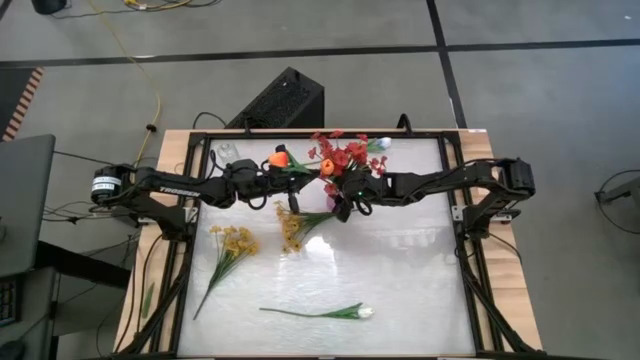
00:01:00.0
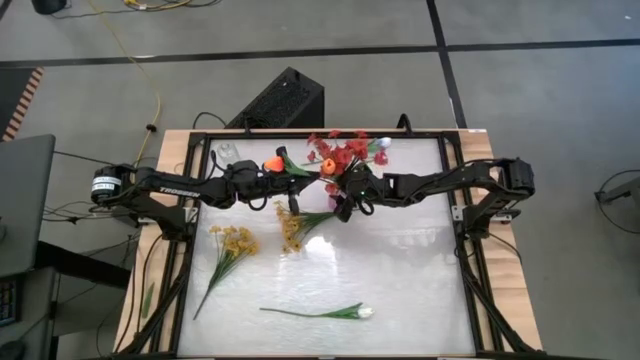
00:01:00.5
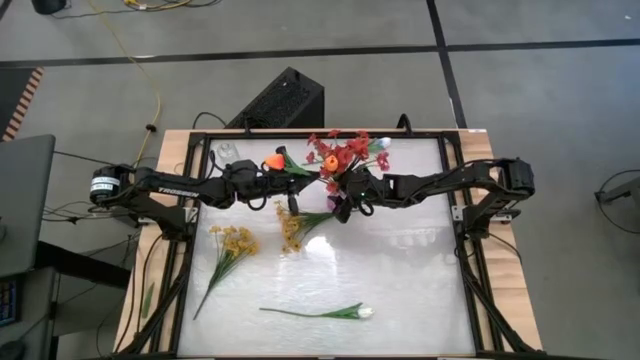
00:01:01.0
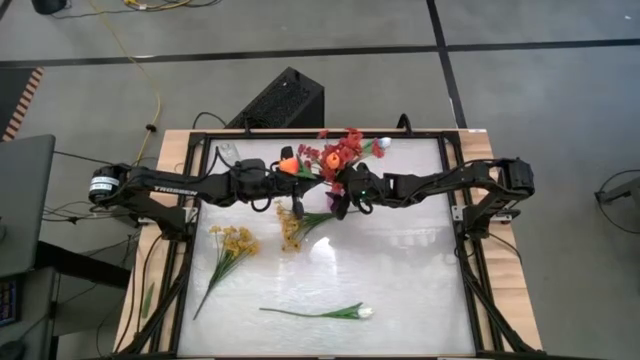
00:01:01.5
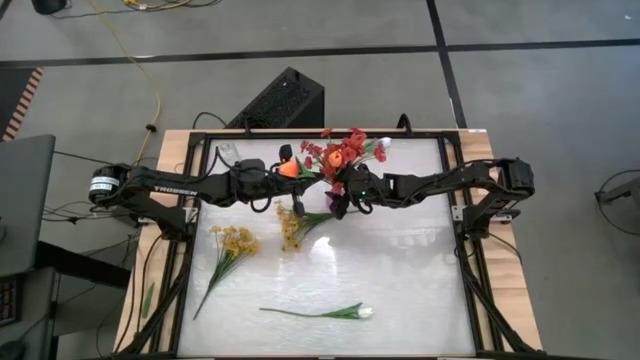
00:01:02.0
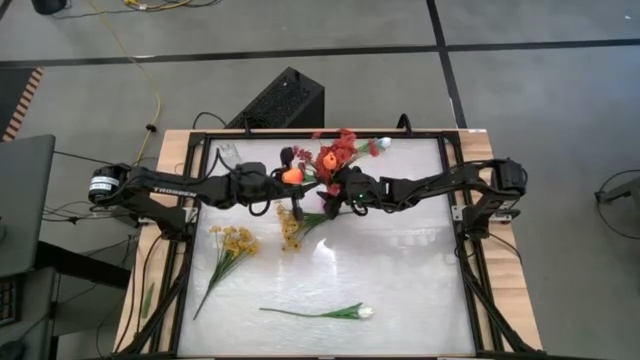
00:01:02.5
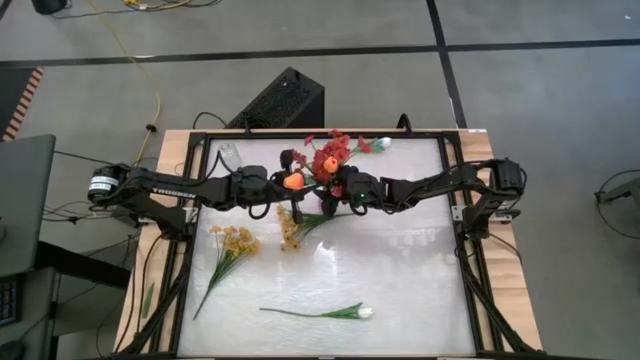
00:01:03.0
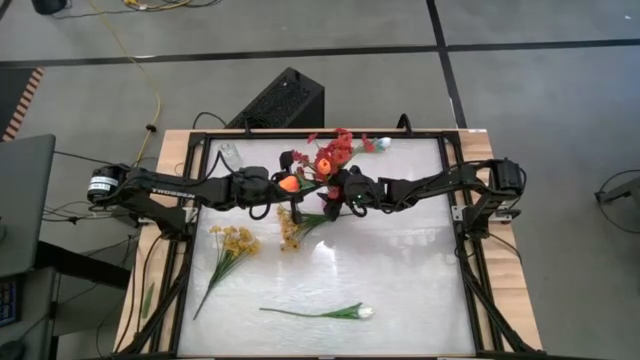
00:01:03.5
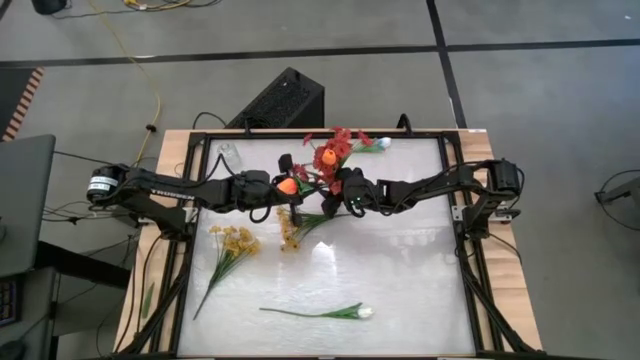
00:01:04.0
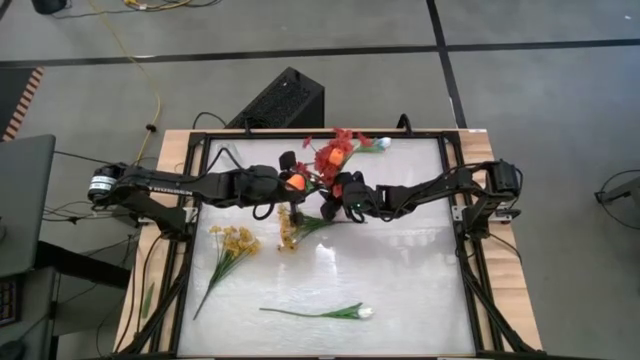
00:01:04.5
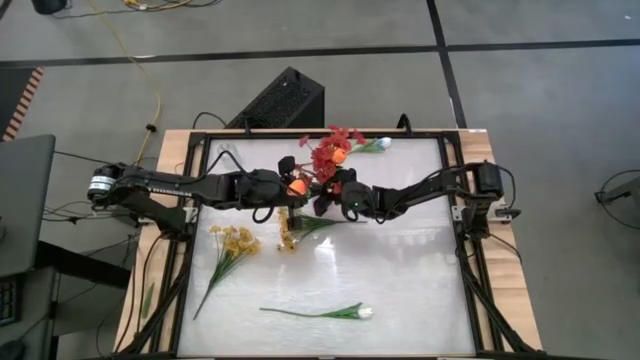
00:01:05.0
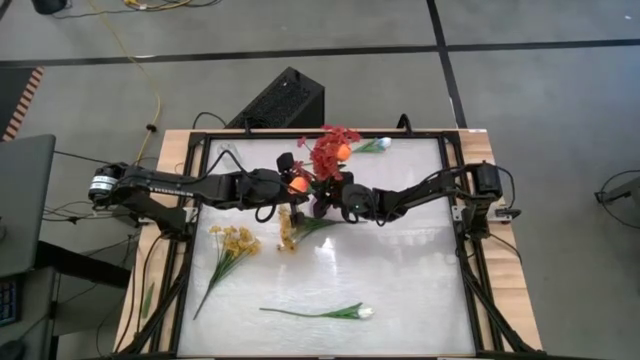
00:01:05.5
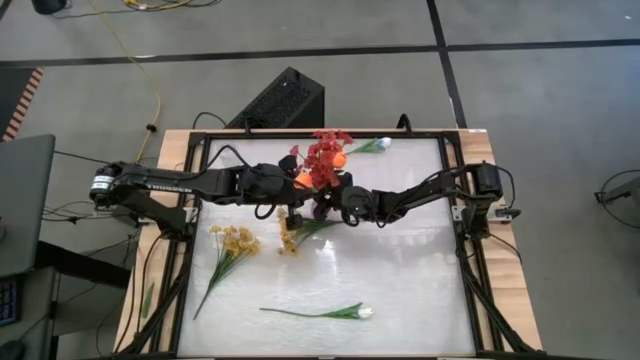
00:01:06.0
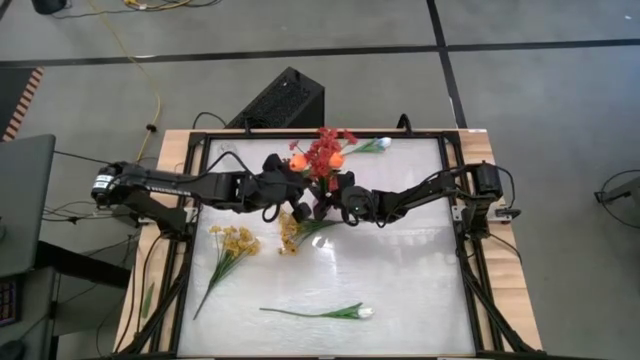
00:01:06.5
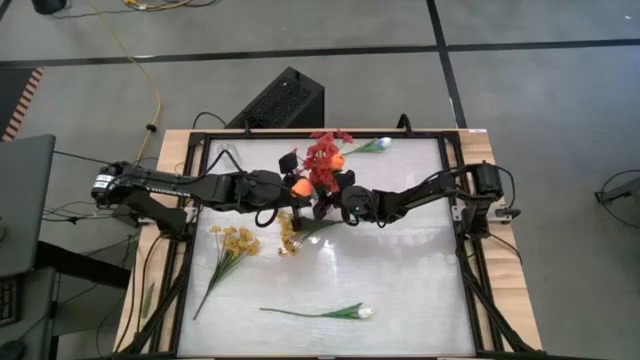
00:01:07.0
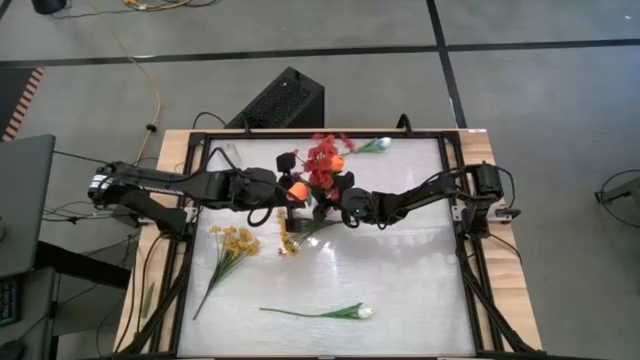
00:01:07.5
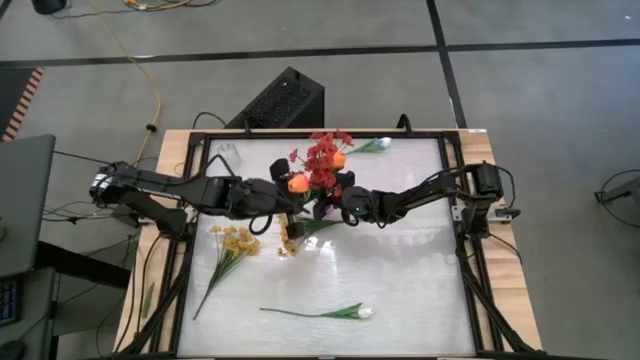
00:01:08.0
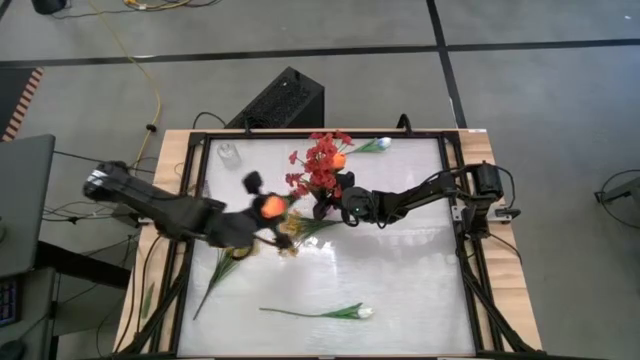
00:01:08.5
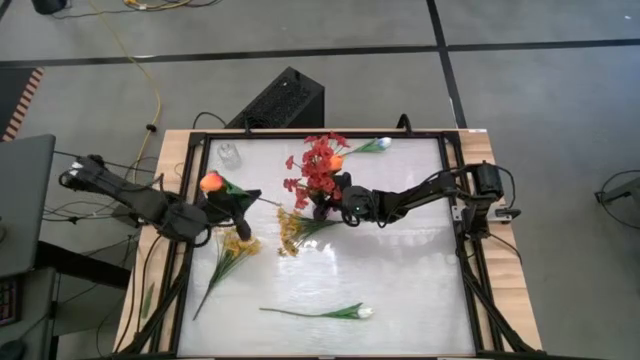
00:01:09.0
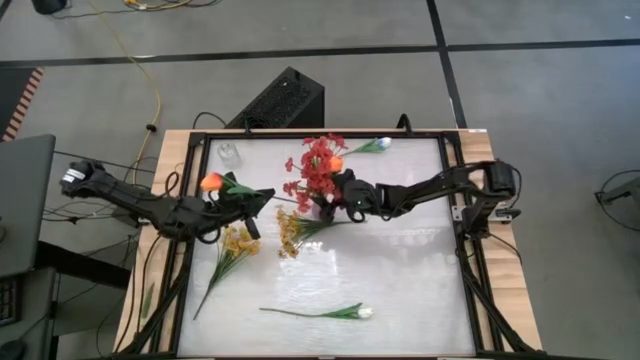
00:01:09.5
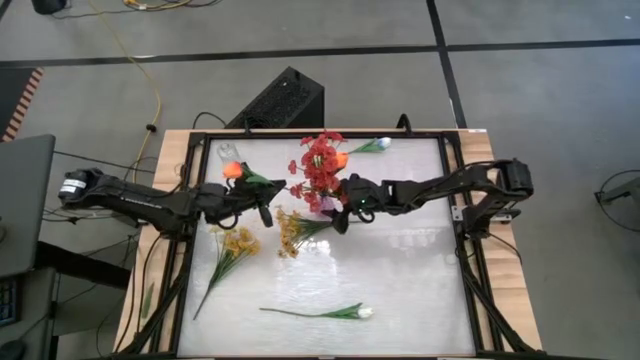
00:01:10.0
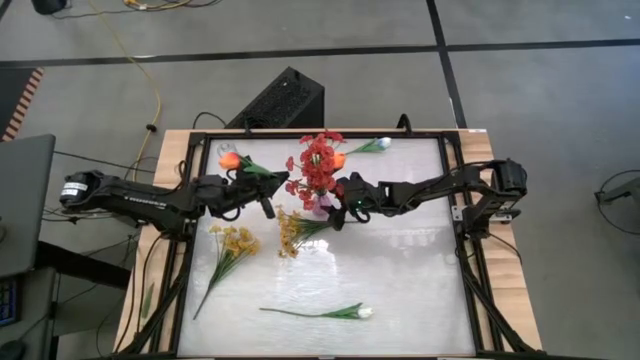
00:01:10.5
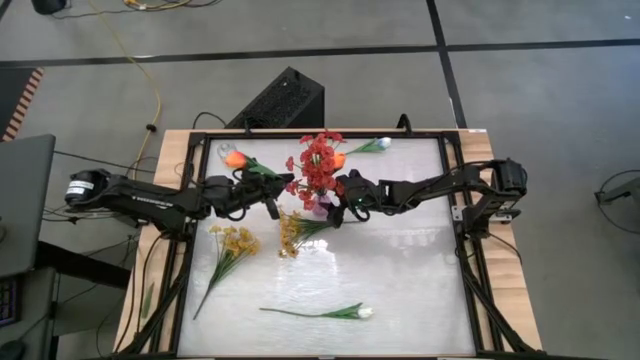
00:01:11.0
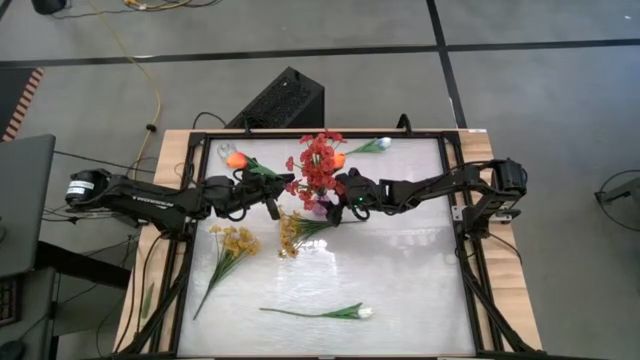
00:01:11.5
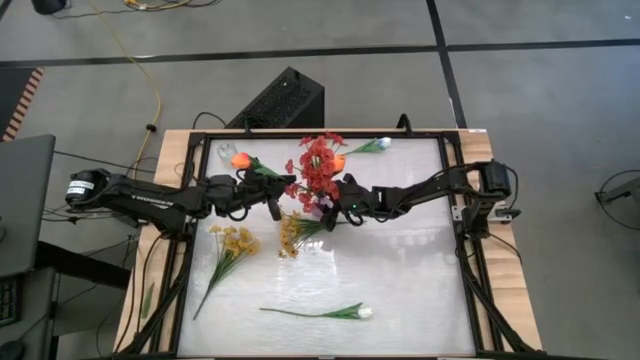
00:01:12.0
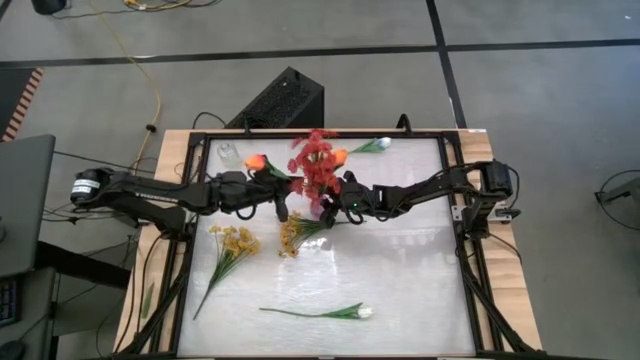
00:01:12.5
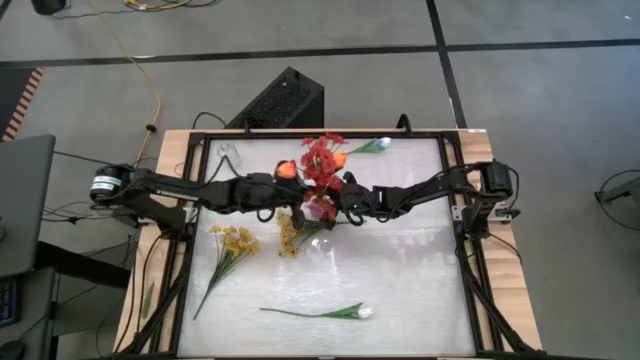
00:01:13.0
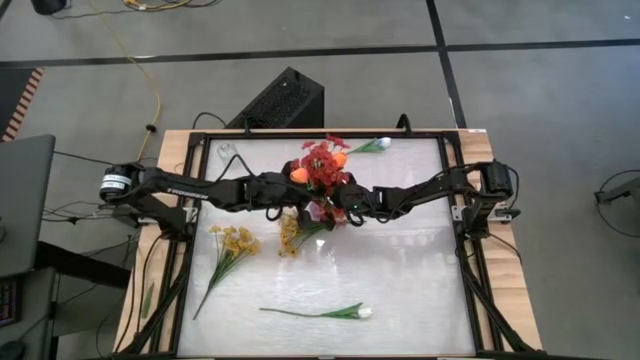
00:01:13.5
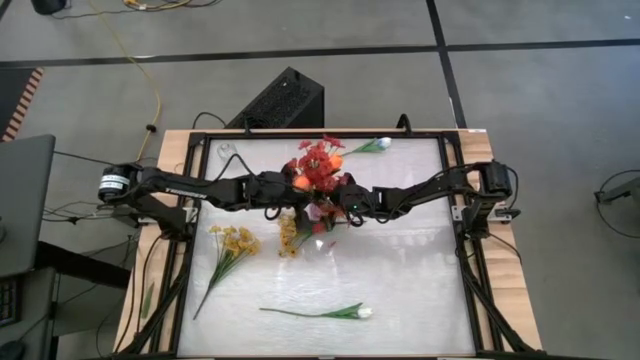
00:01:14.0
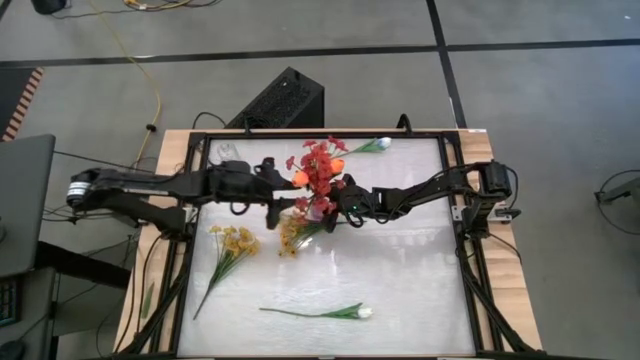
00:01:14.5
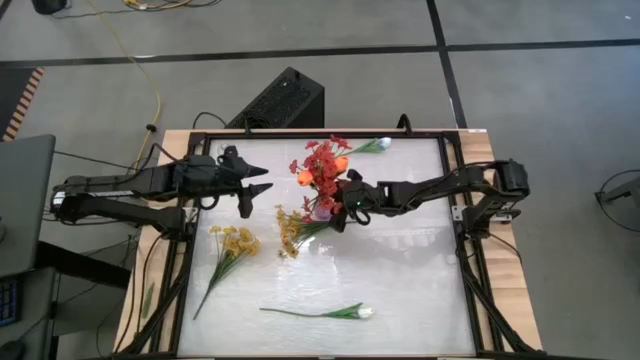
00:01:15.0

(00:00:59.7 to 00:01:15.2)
Task: Sort flowers into vase by color
Put the orange tulip into the violet vase

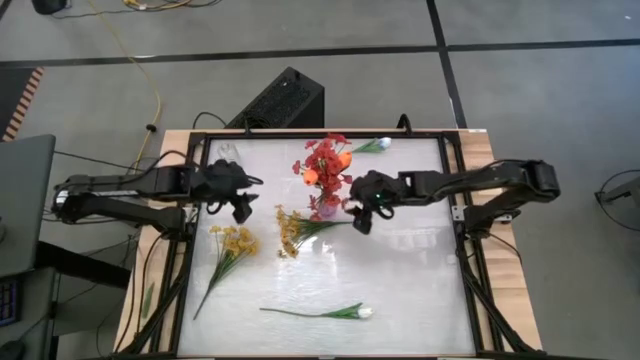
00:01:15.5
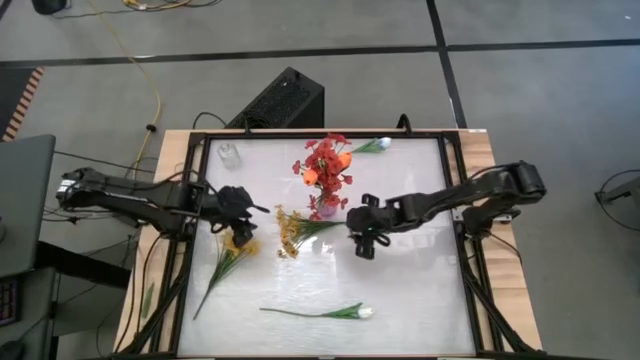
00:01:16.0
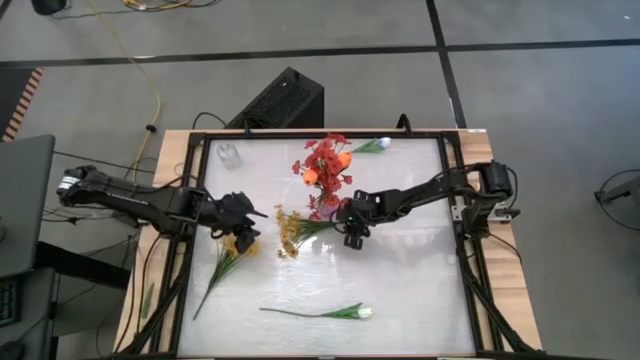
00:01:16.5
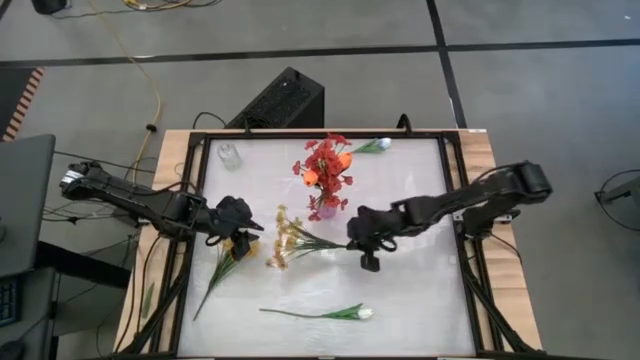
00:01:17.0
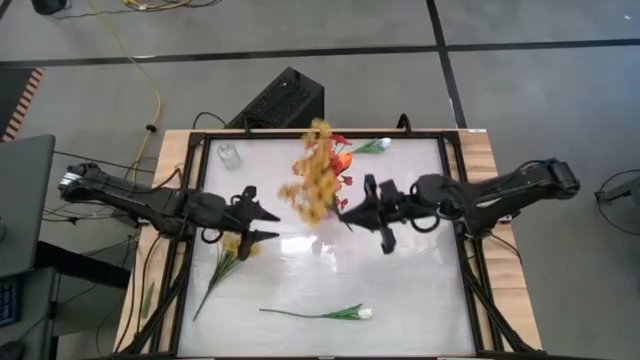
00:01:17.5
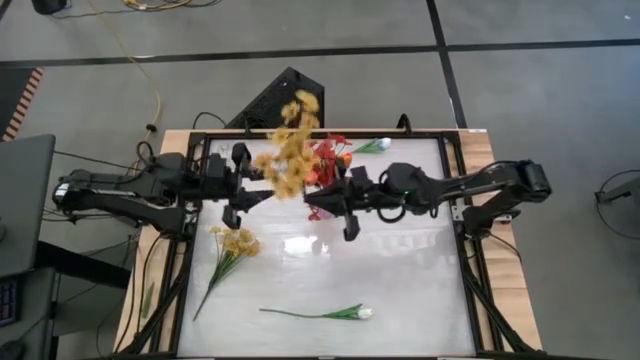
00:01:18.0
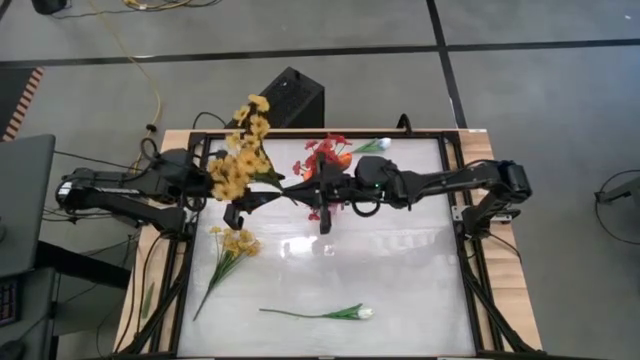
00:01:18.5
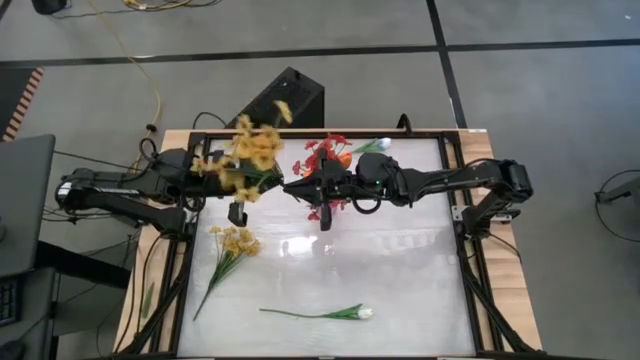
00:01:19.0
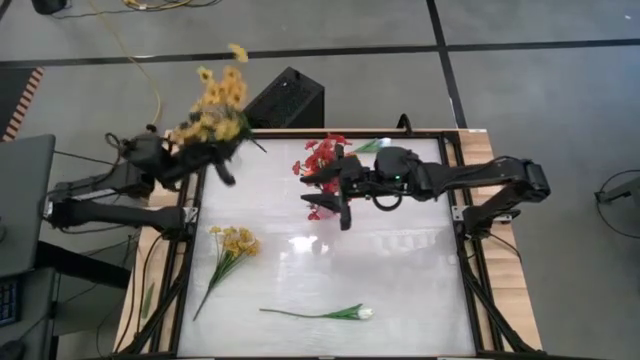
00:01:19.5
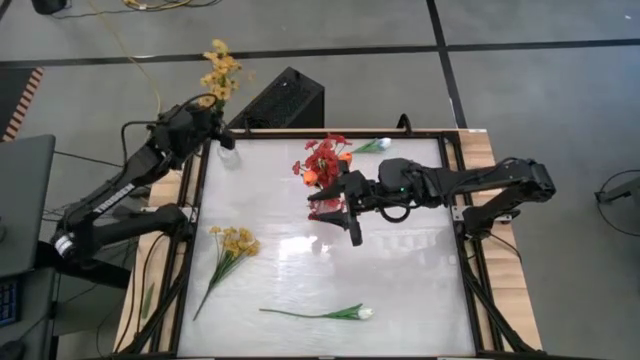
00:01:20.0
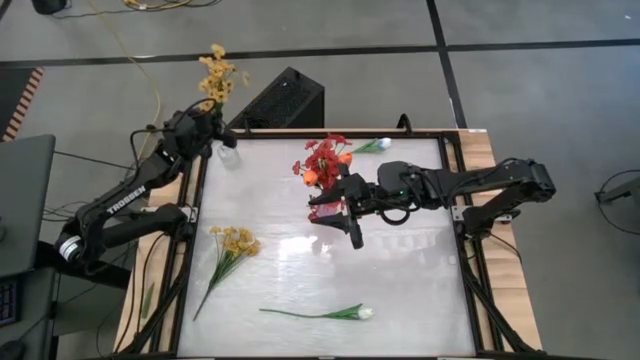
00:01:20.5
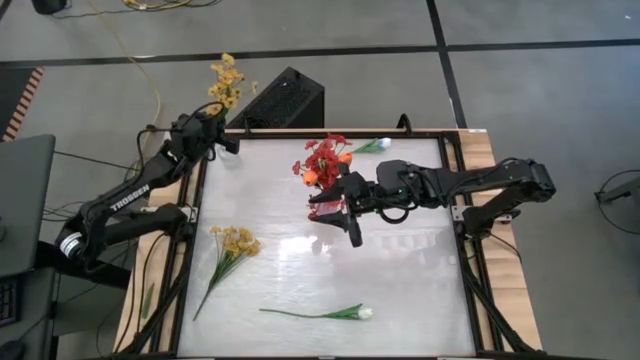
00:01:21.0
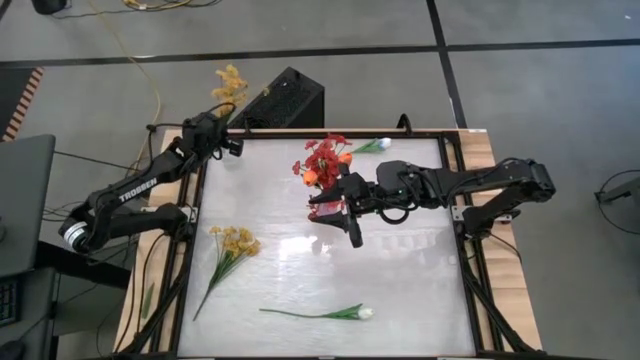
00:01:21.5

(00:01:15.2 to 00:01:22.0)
Put the right yellow flower into the transparent vase
